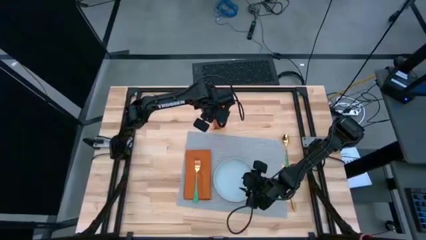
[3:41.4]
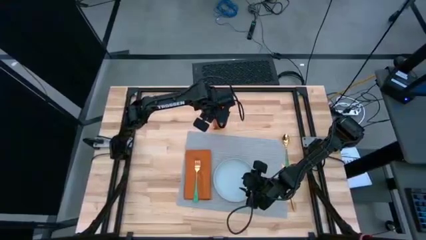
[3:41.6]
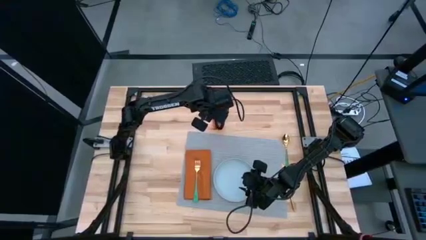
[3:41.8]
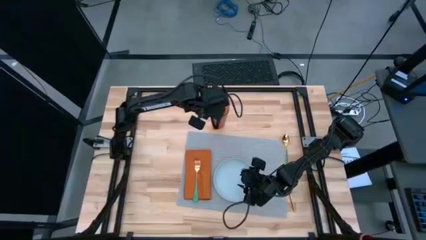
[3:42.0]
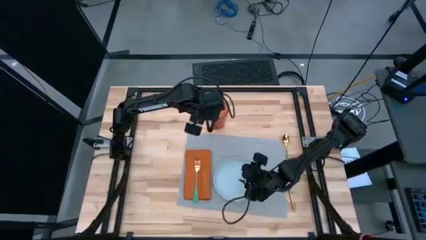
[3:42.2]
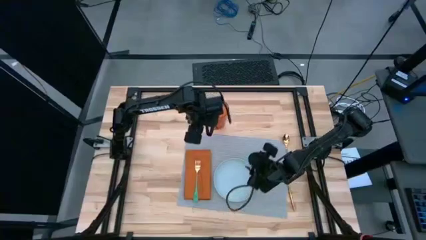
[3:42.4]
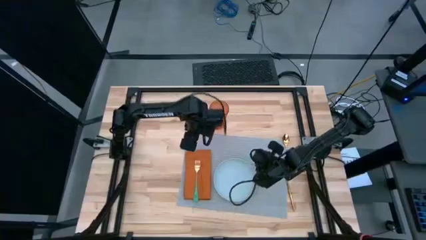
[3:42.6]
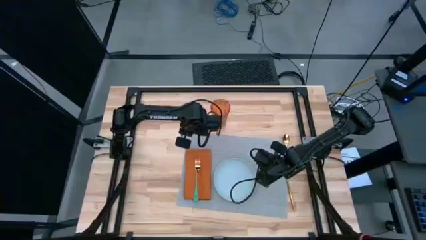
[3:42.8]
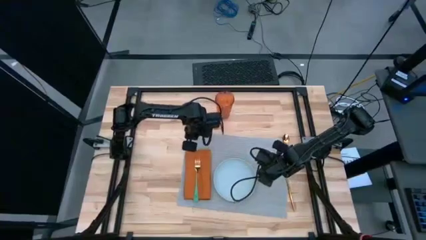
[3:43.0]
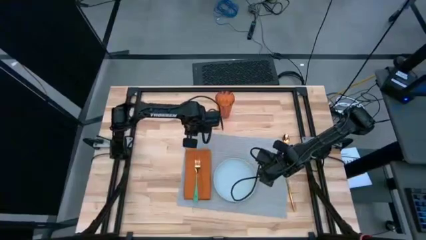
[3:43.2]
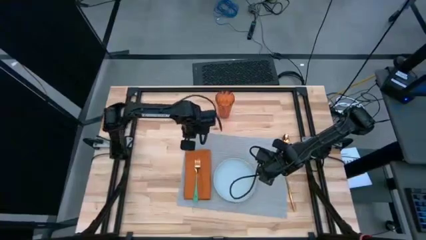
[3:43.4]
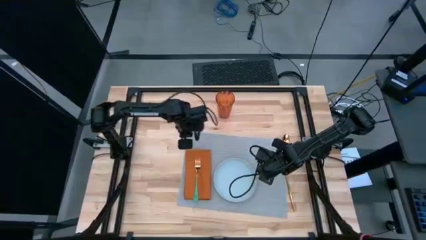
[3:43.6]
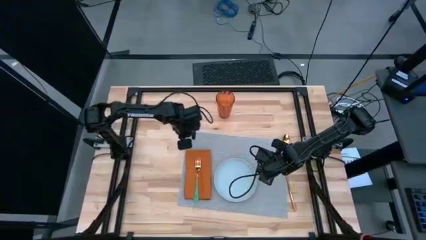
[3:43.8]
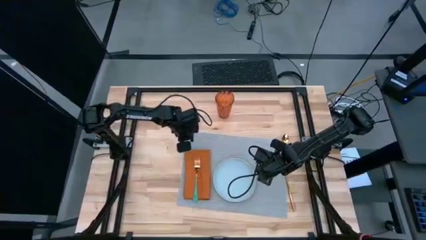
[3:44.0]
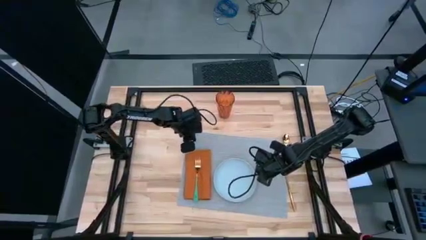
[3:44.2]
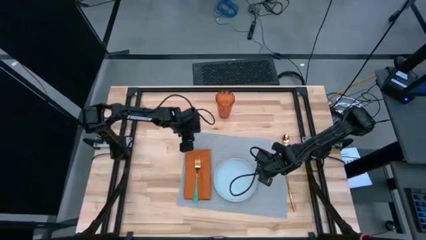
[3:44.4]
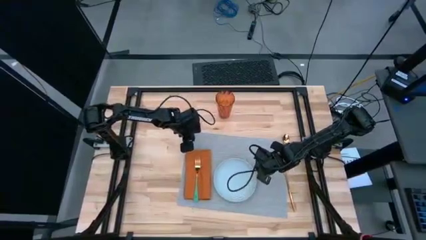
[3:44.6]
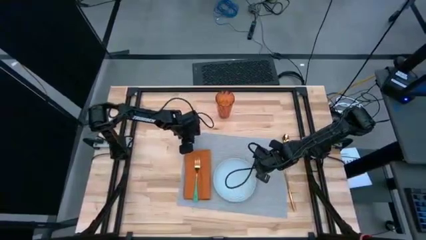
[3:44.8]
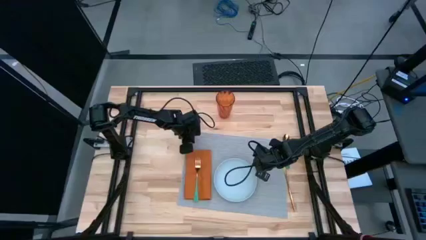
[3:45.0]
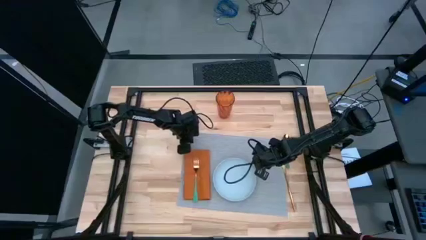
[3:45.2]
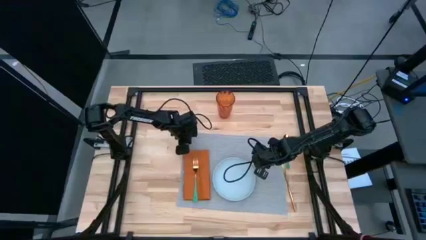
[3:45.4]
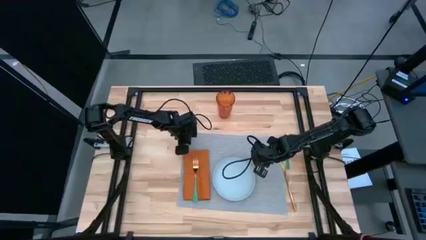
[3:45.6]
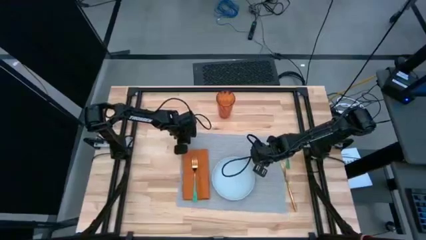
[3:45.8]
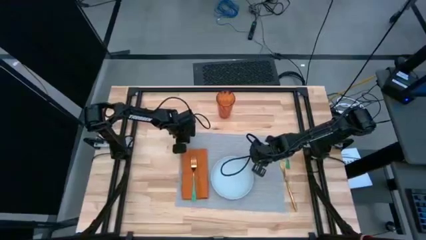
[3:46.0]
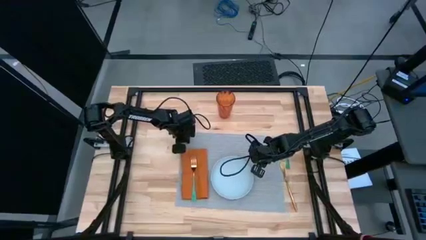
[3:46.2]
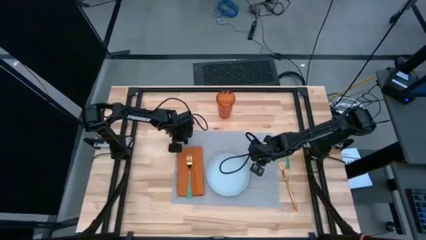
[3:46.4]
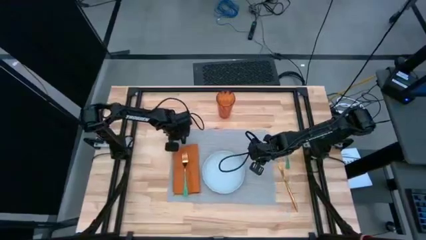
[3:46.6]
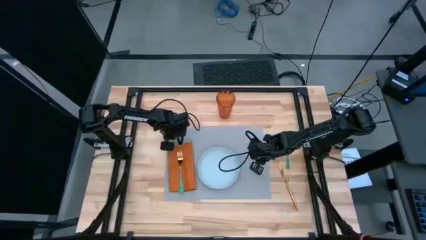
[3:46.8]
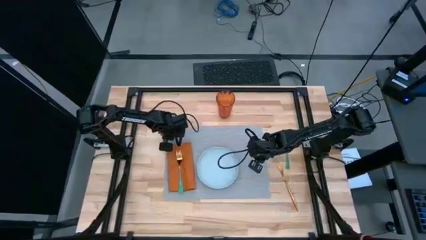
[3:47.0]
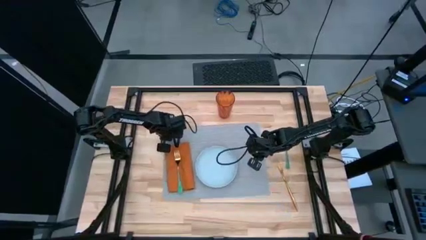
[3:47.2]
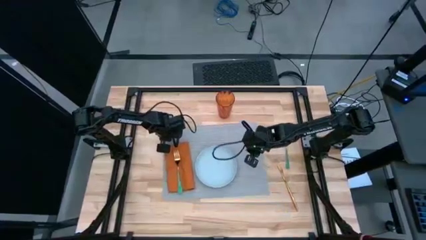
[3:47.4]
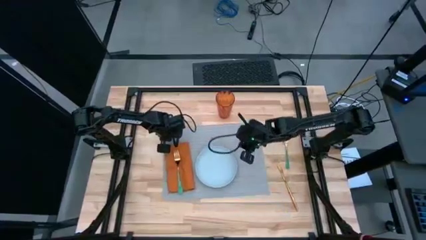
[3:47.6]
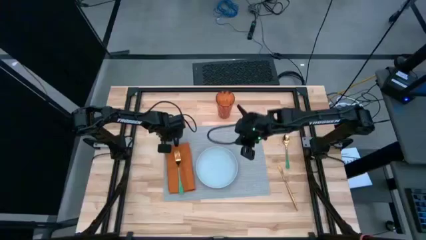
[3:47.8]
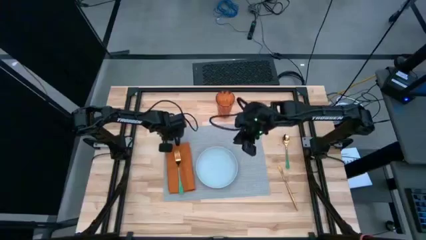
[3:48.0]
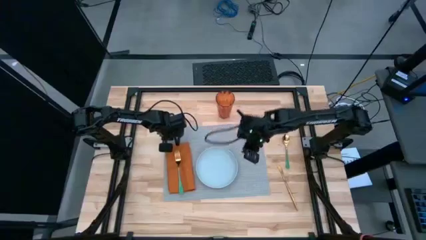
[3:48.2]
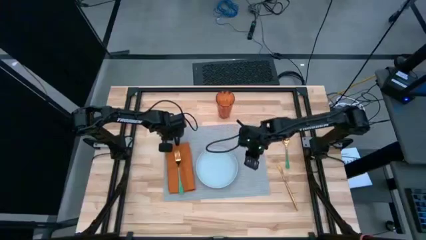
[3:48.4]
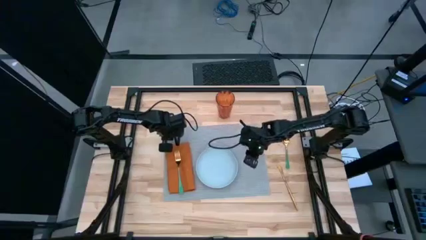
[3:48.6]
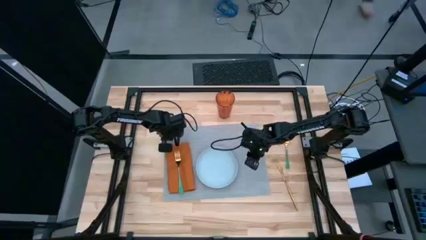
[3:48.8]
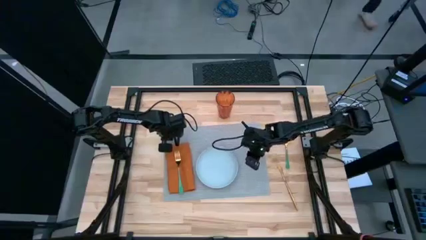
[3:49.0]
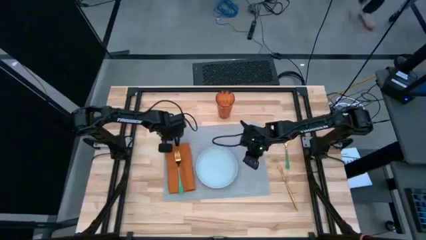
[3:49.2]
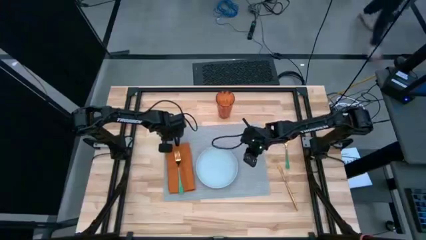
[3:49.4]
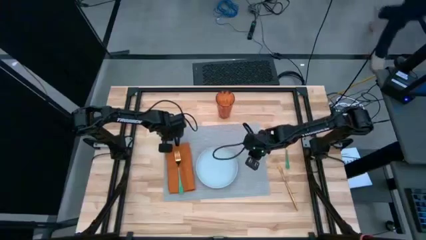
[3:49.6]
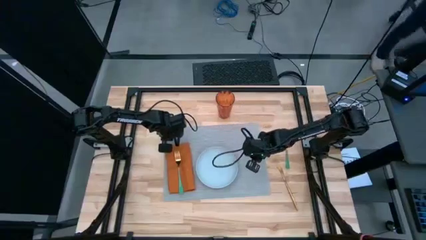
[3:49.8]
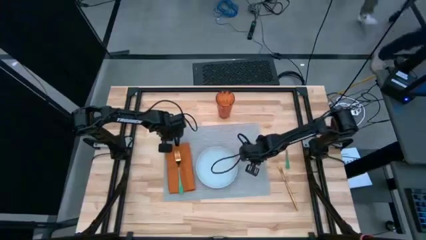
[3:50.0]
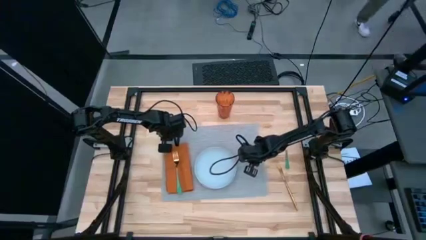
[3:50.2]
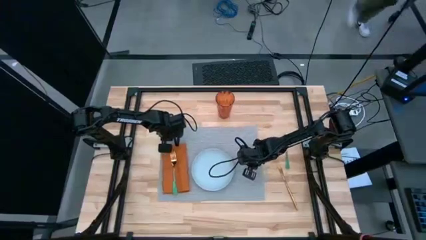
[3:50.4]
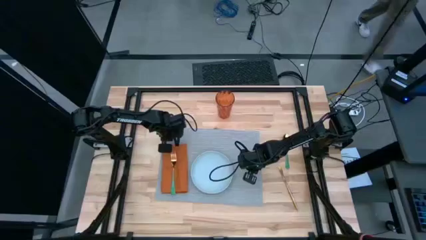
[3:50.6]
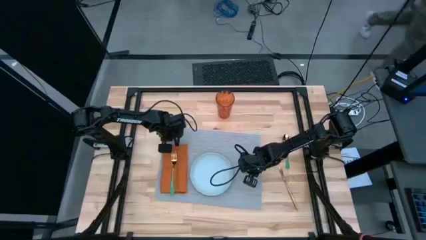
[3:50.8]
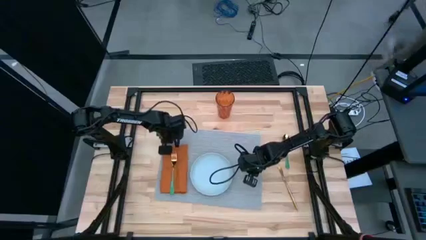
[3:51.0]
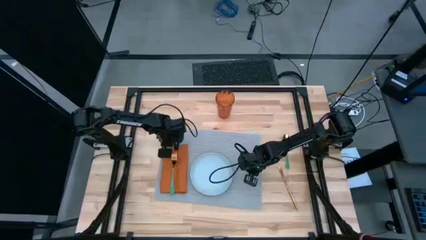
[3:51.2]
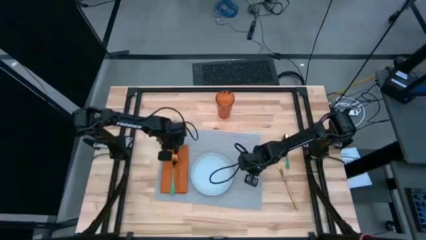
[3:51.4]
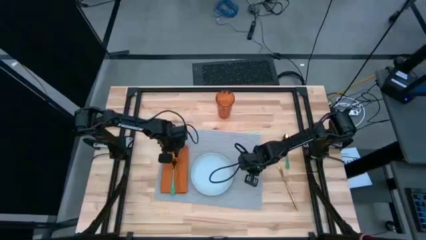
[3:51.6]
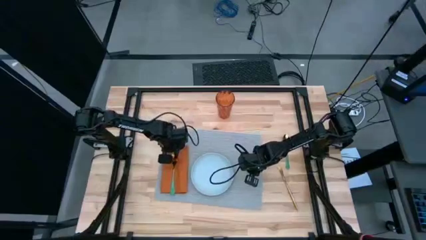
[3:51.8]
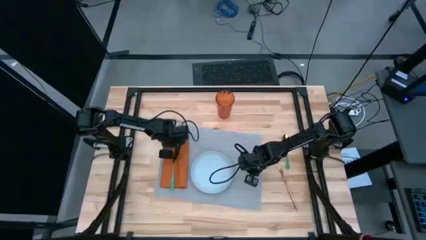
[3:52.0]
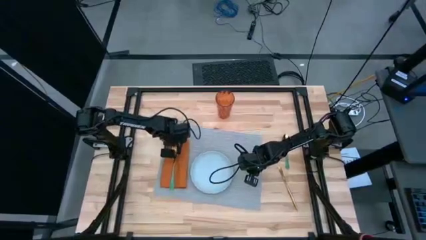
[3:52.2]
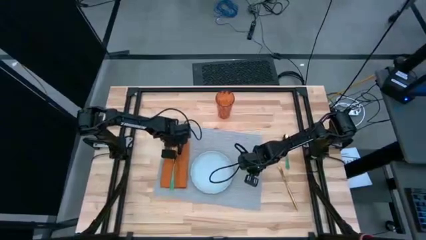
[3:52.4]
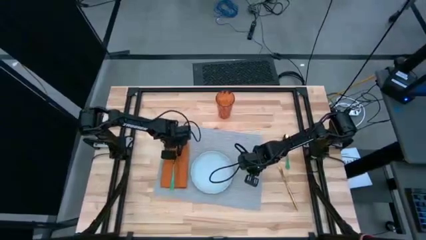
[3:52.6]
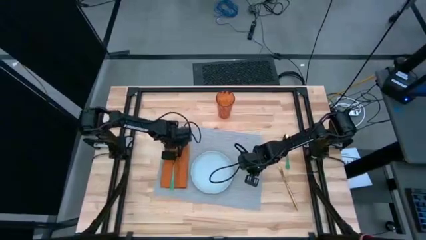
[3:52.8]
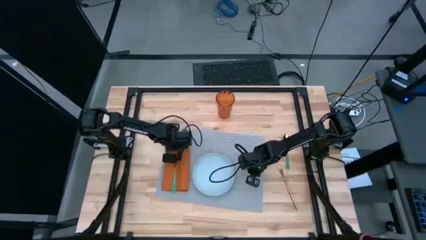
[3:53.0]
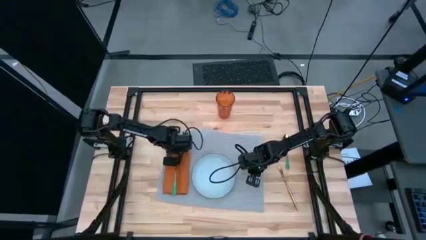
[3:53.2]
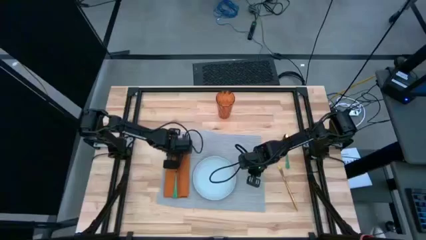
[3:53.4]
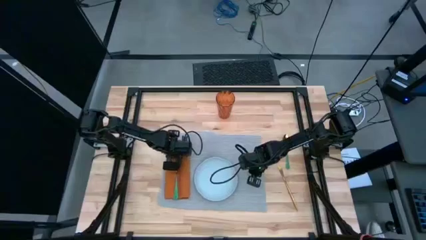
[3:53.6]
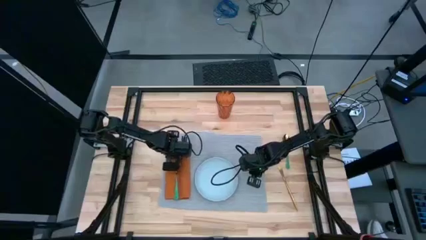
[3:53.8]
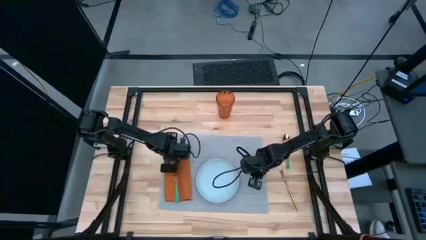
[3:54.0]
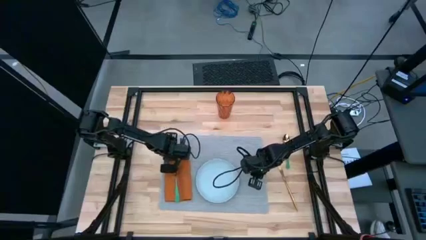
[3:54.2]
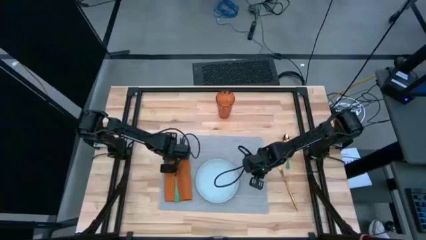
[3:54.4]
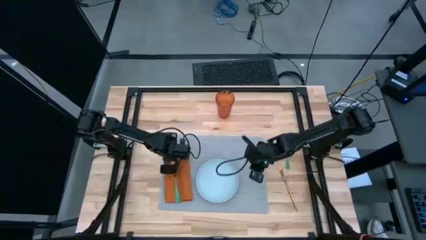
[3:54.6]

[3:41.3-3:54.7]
Task: Set table place
Adjust the grey placemat

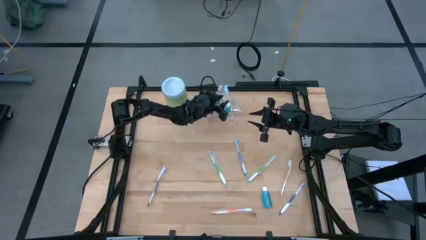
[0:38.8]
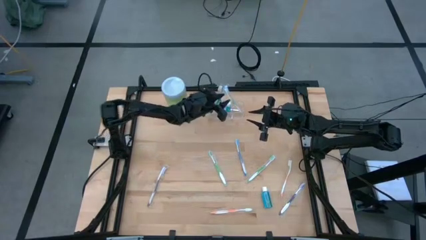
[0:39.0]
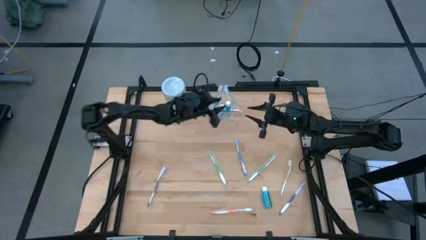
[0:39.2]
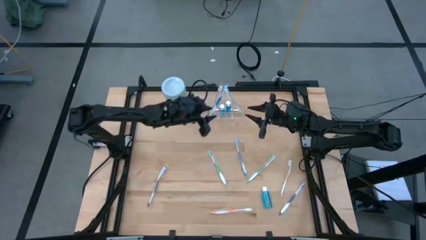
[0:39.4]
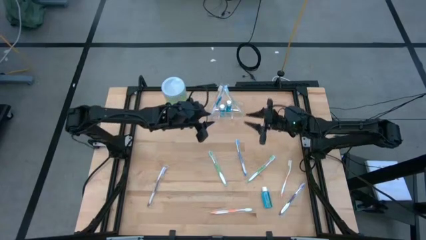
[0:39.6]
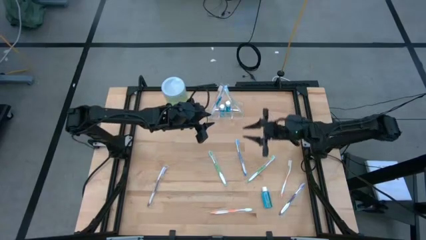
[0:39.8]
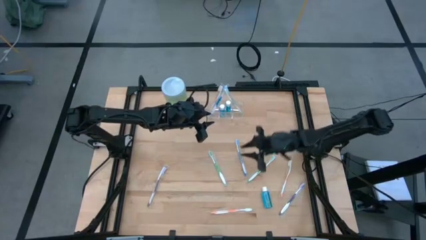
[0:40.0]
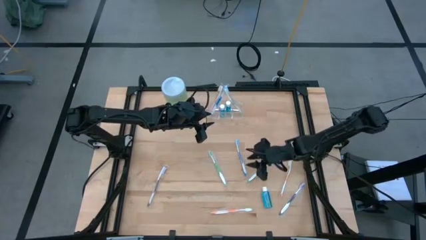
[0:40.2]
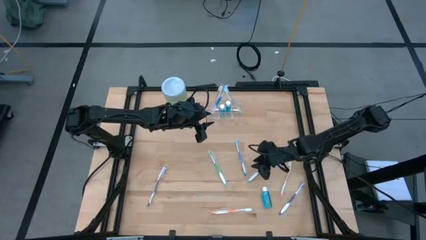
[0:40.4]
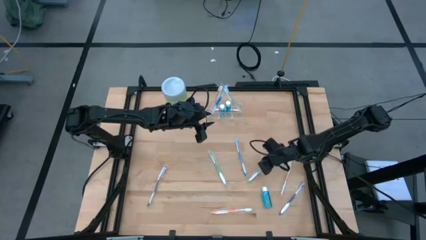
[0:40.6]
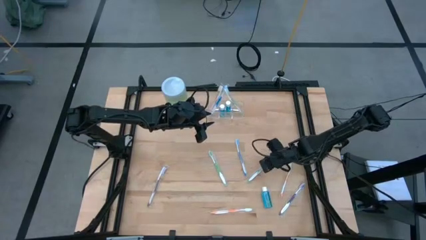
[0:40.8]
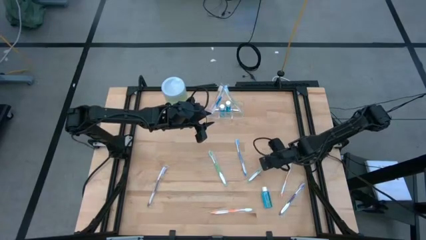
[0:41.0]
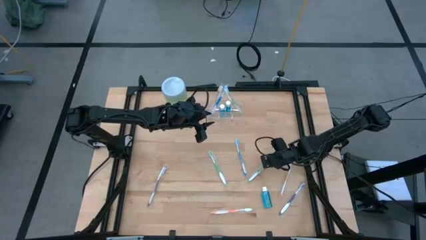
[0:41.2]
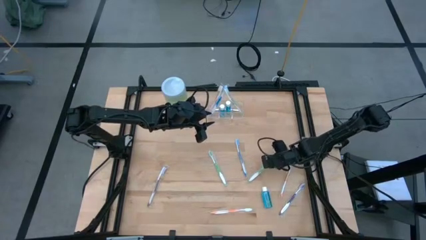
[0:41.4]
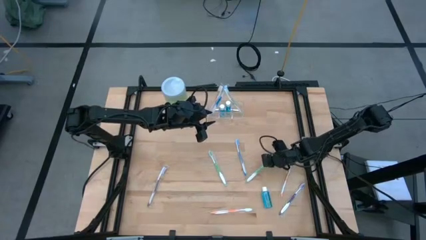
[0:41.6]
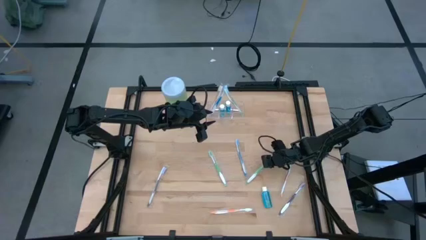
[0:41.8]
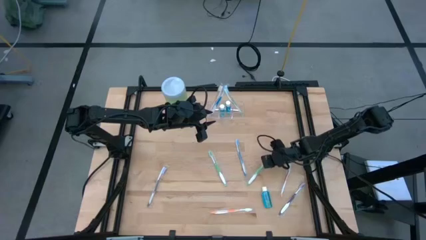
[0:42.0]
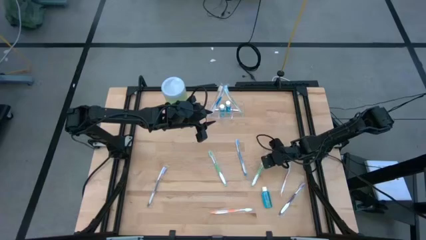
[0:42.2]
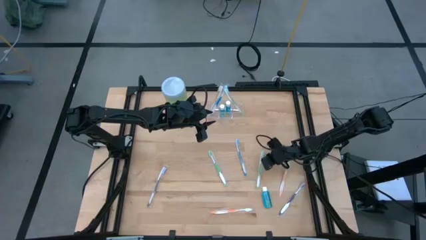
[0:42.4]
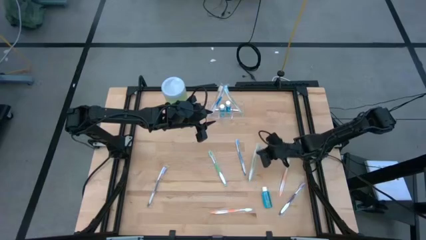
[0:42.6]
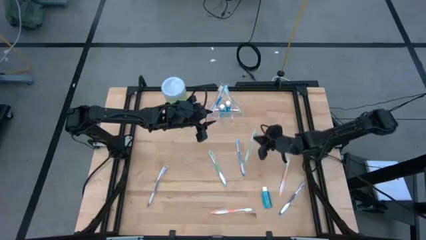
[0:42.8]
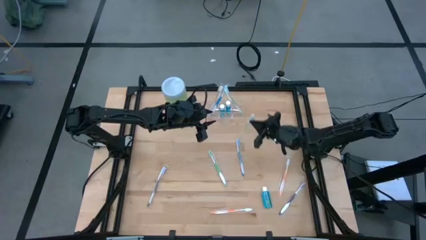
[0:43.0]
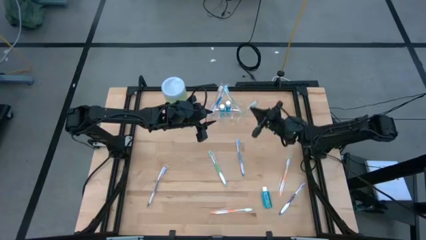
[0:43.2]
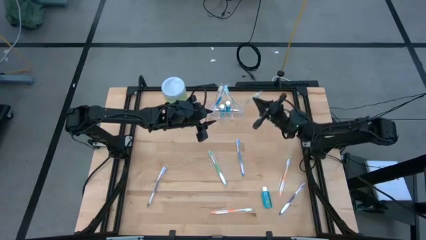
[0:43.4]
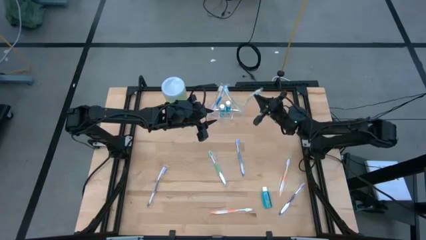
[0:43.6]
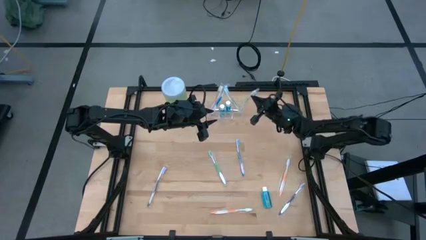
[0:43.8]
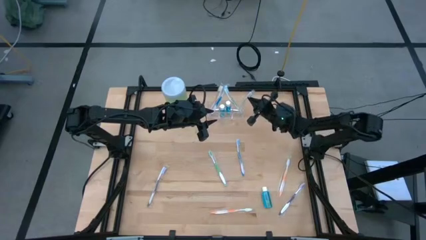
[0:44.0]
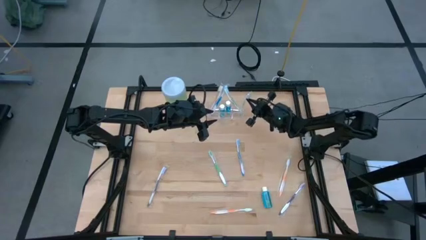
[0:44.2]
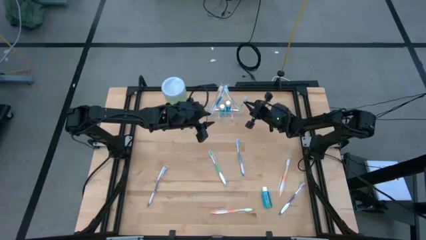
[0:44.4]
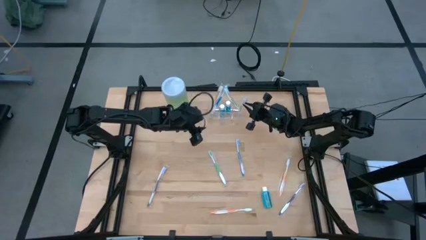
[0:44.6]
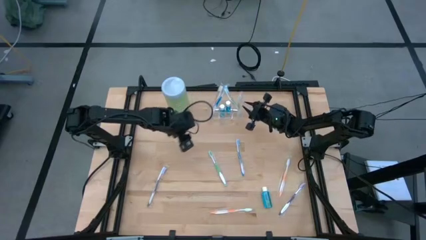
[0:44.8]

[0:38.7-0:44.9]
Task: Pick & Place toothbrushing station
Put the right green toothbrush into the transparent organizer
